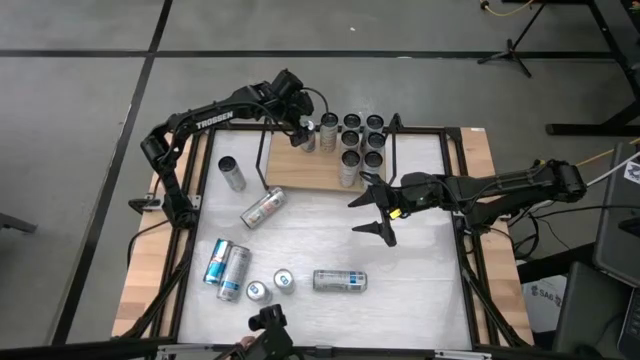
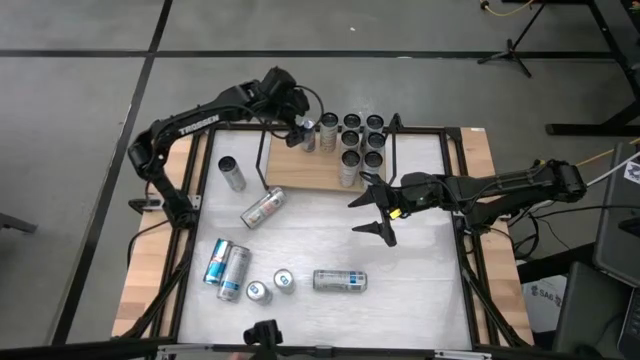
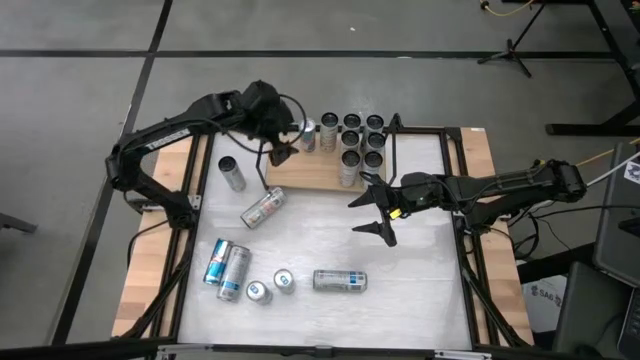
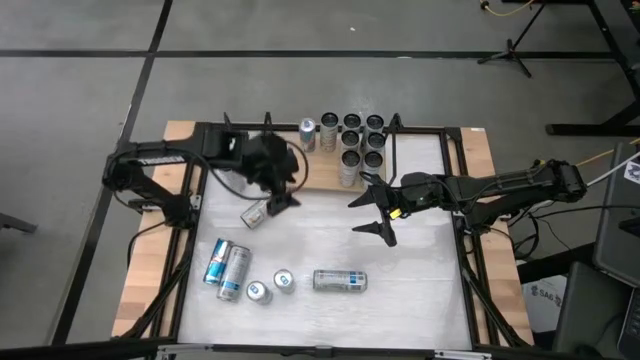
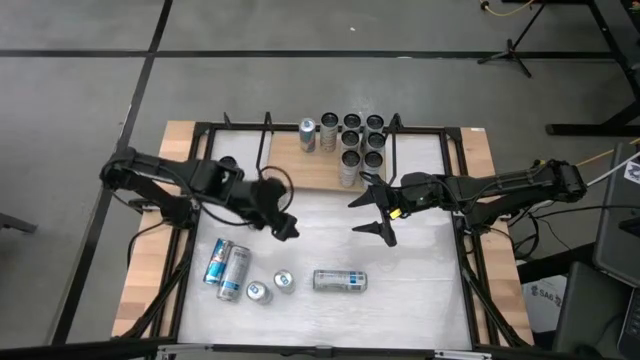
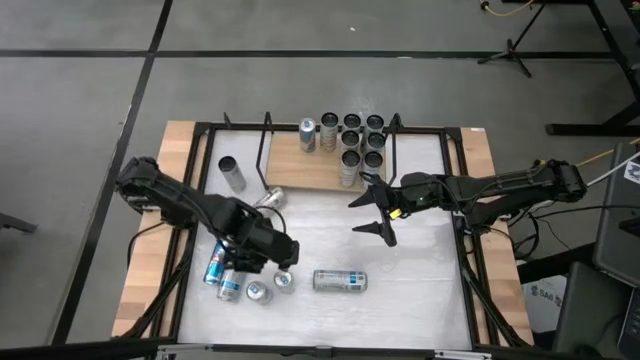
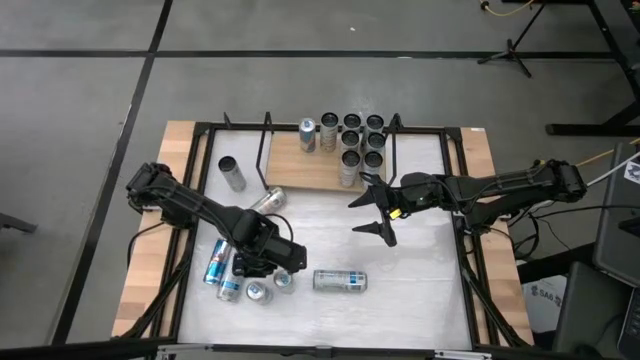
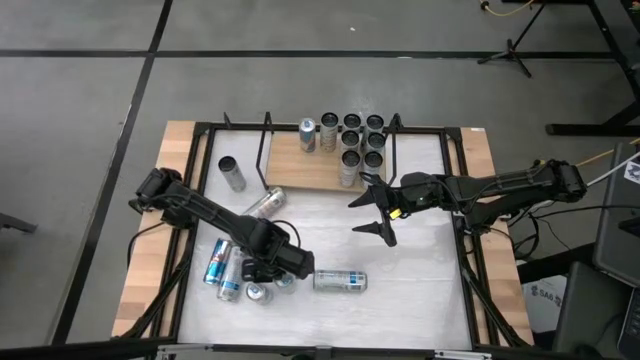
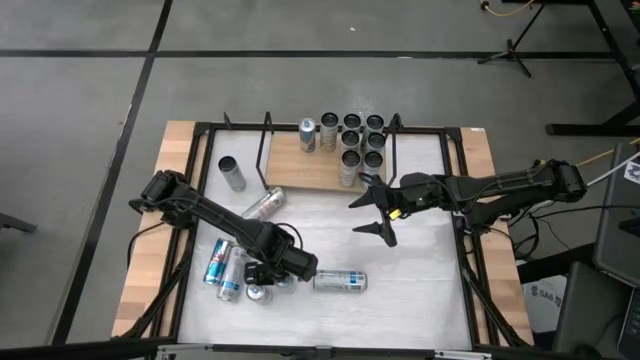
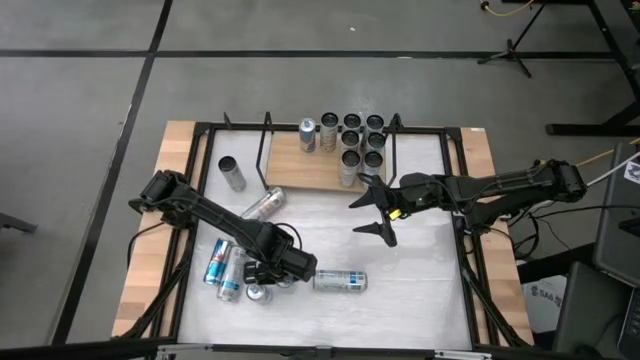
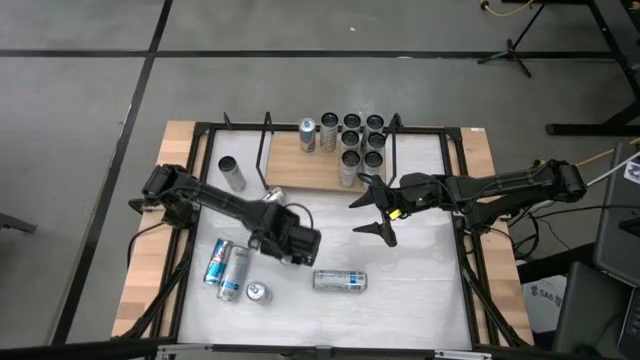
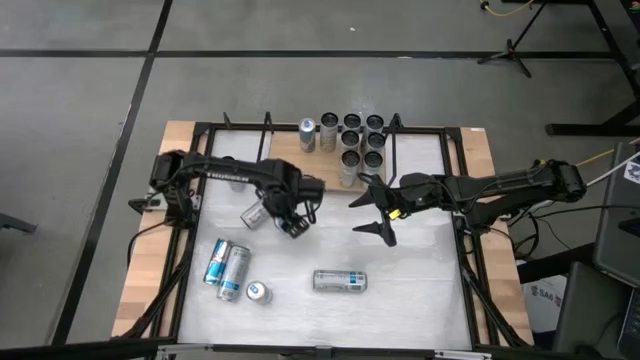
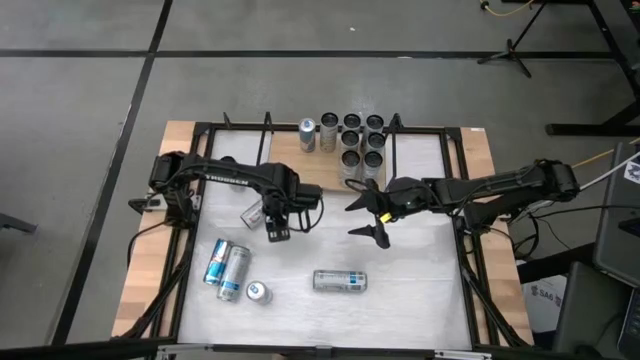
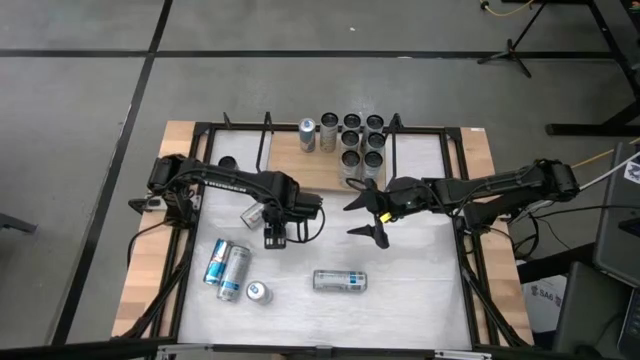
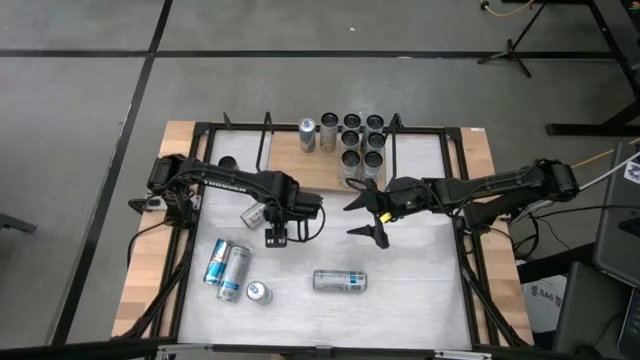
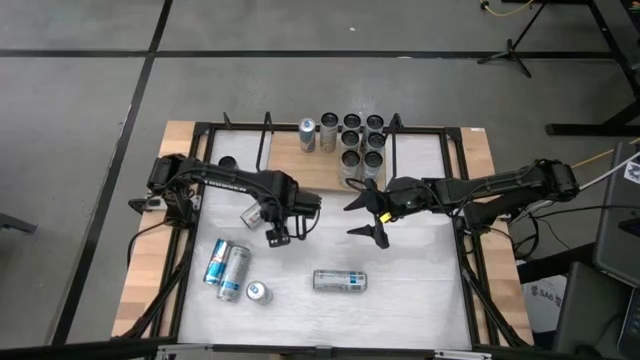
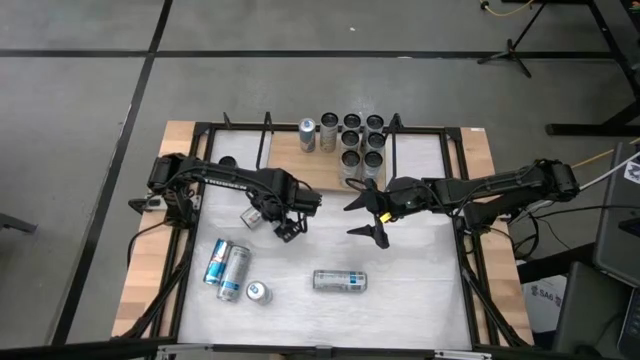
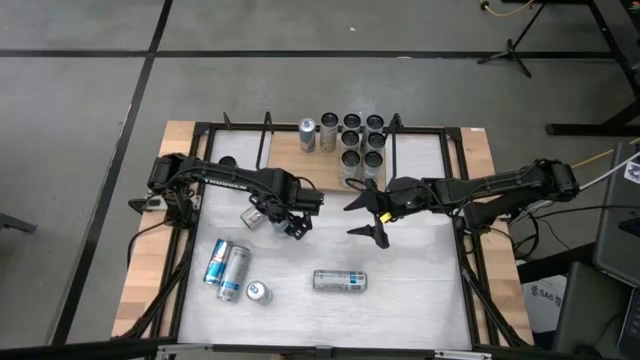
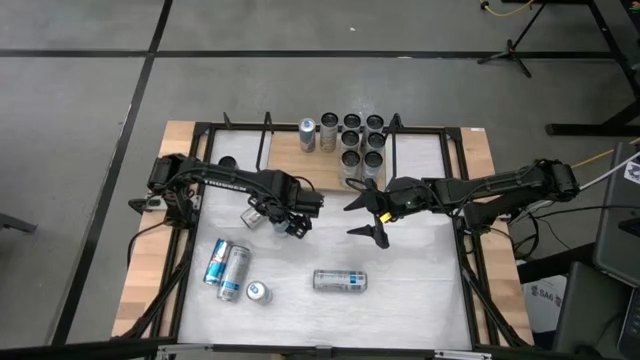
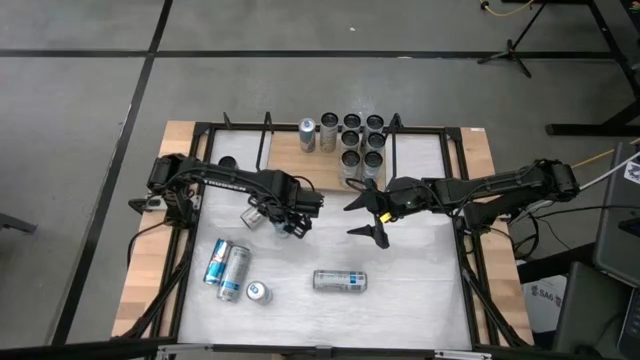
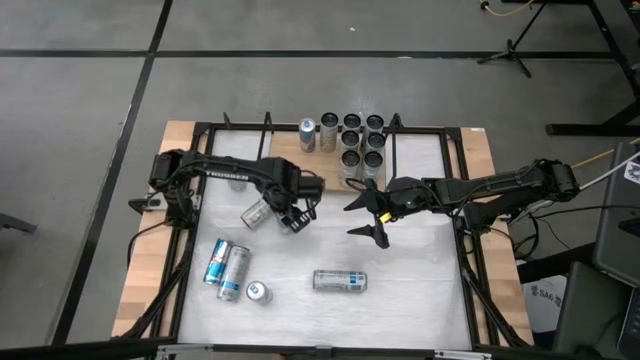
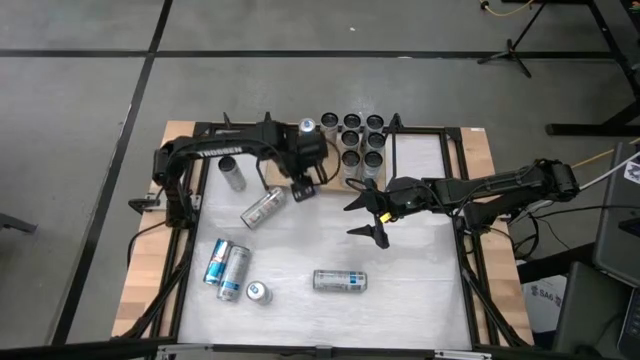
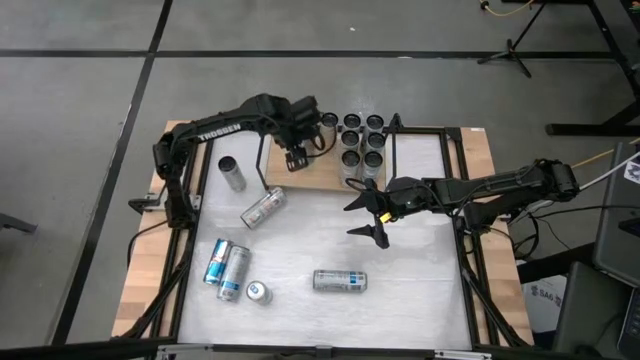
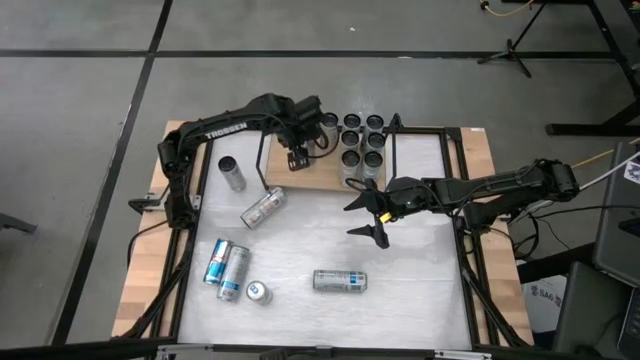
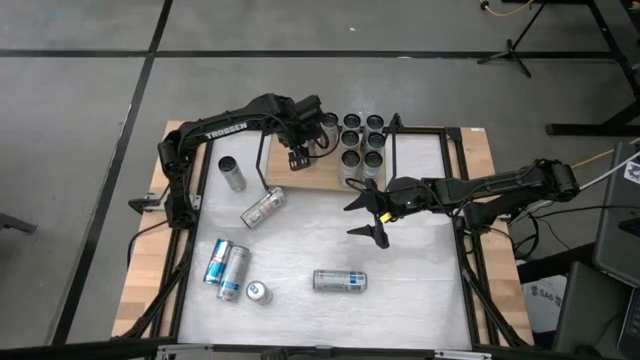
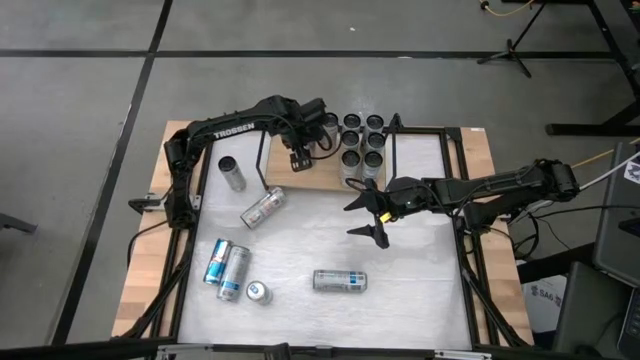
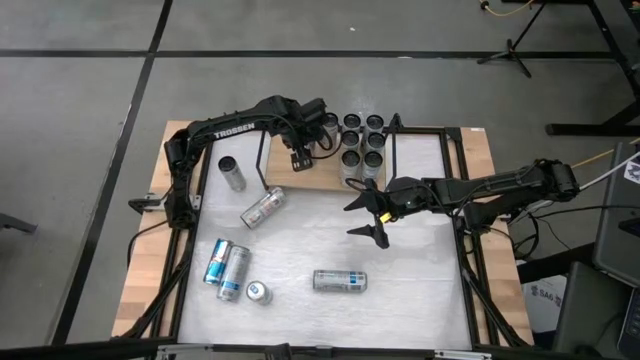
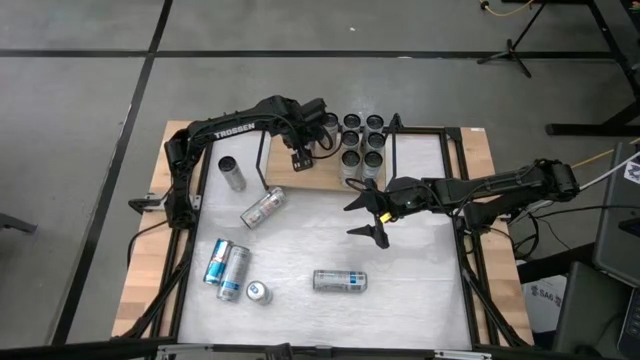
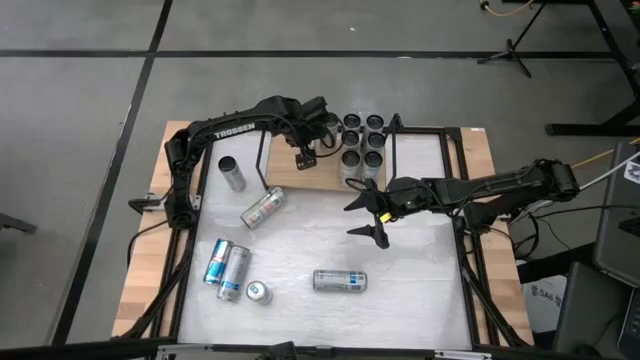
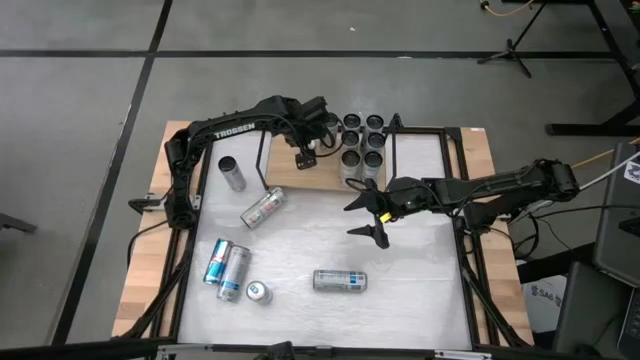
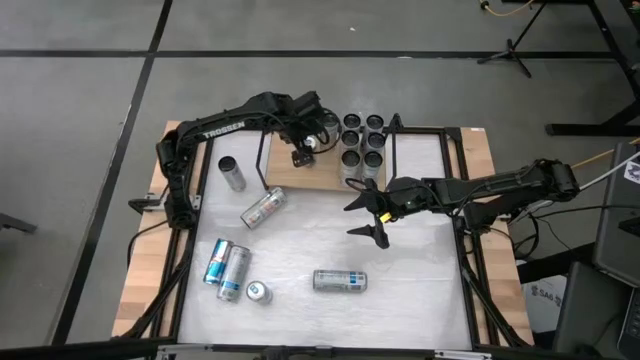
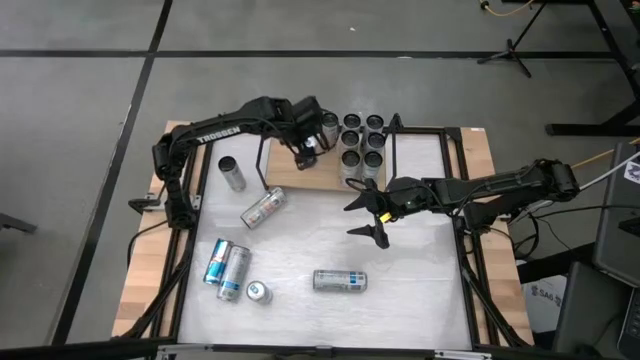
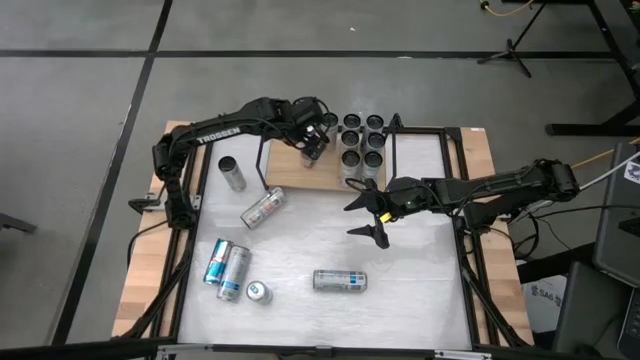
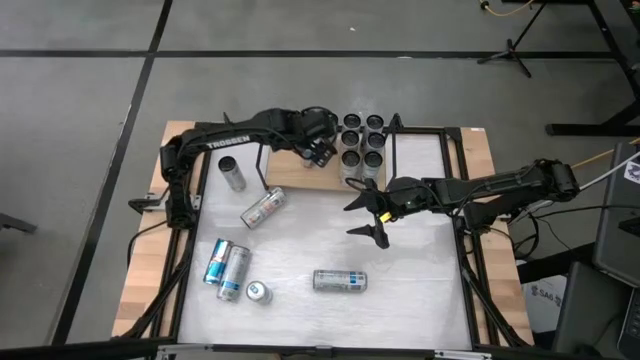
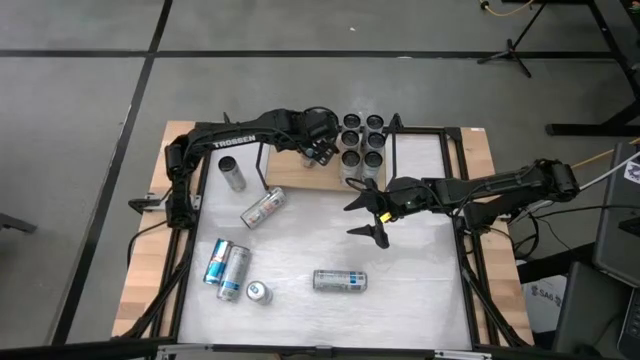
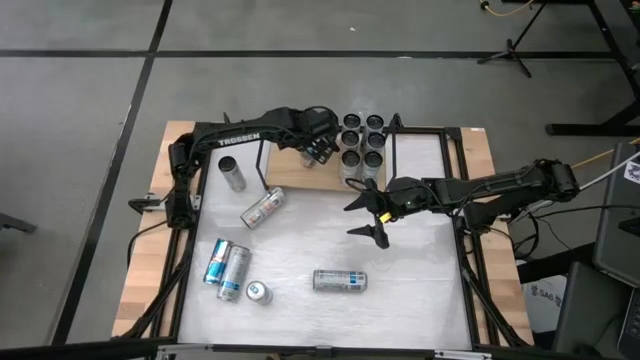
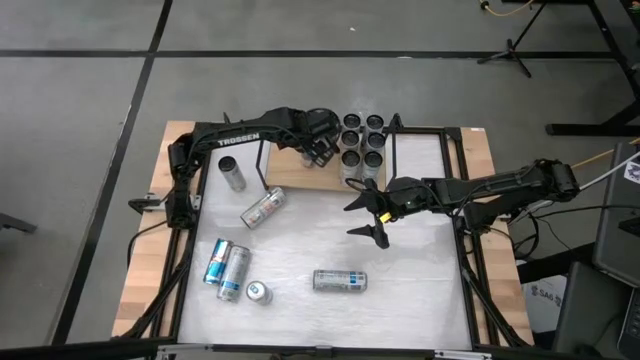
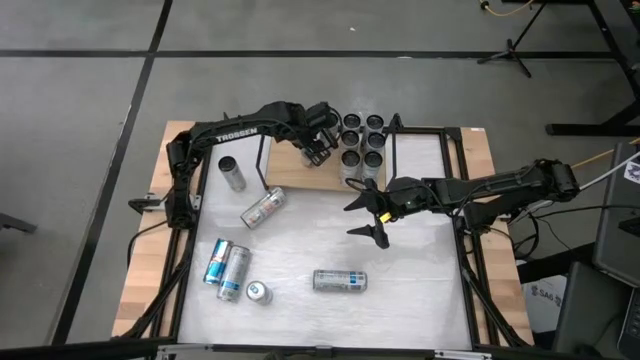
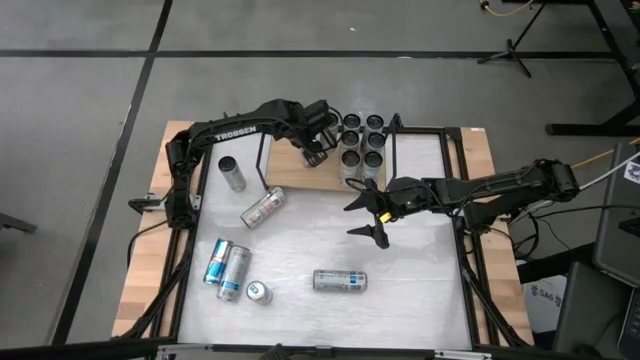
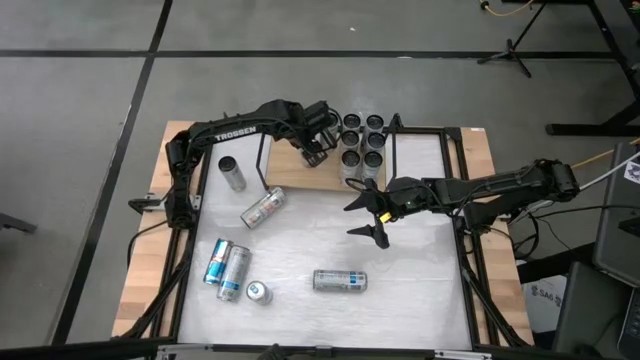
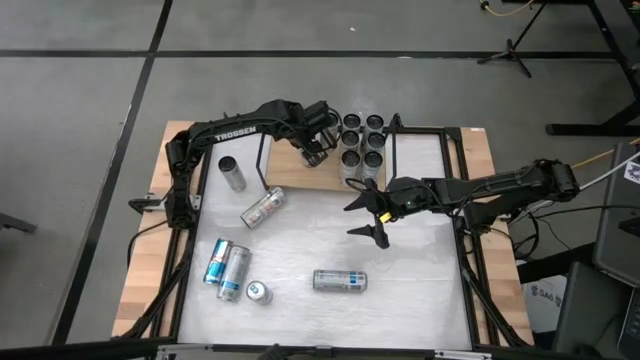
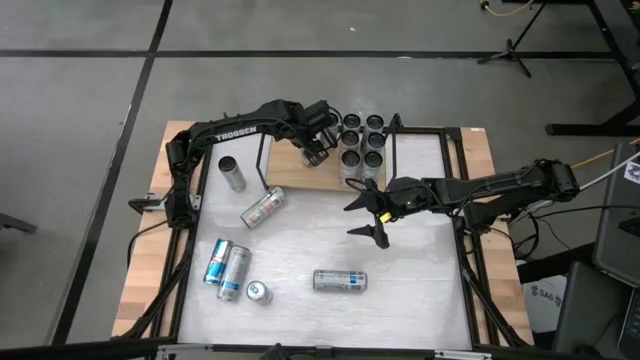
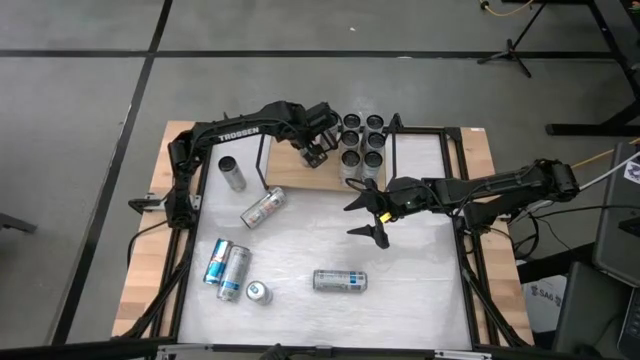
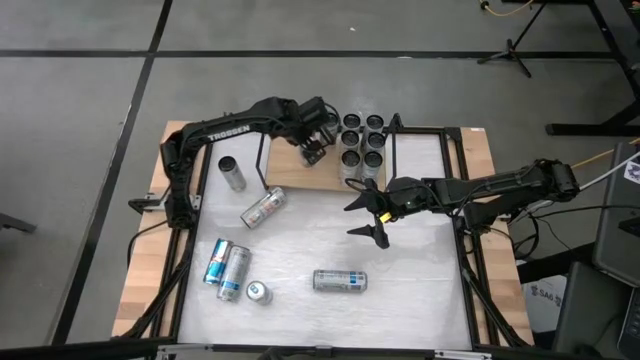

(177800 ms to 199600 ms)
Task: Place canned beverage on shelf
Put the blue soda can aligned with the other blue soda can on the shelf
